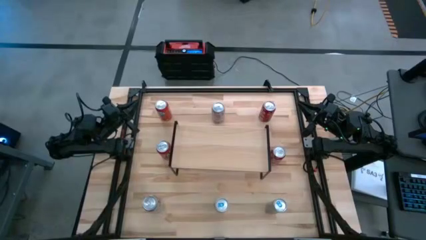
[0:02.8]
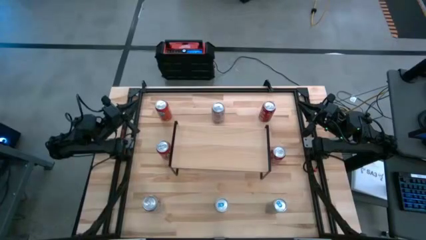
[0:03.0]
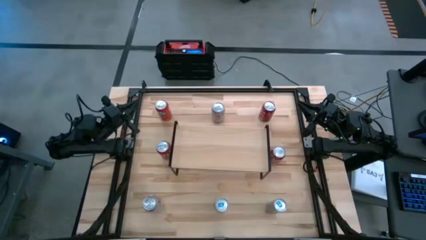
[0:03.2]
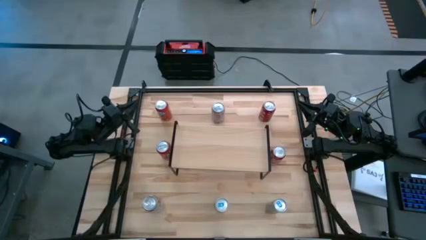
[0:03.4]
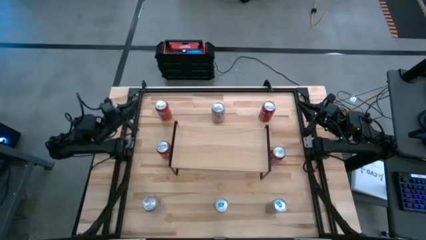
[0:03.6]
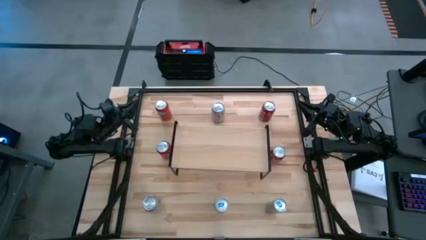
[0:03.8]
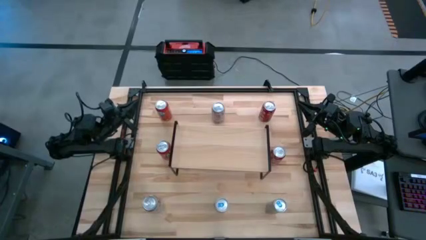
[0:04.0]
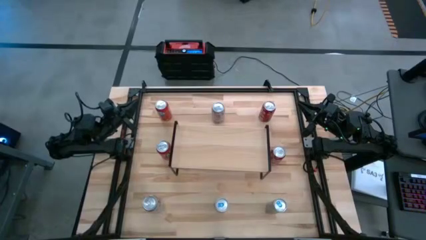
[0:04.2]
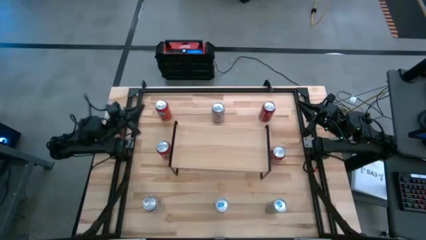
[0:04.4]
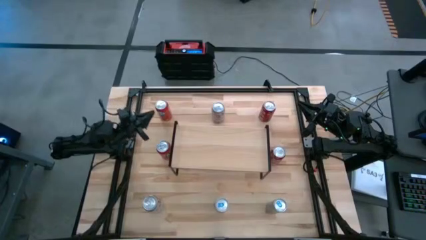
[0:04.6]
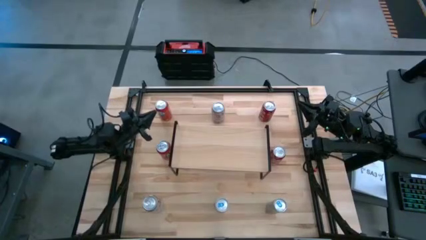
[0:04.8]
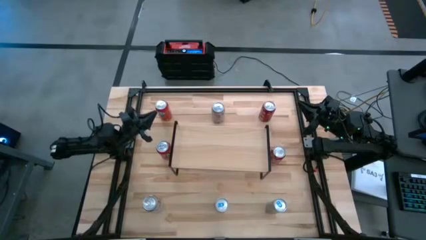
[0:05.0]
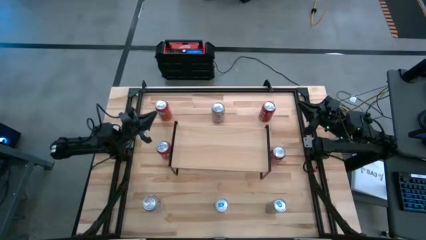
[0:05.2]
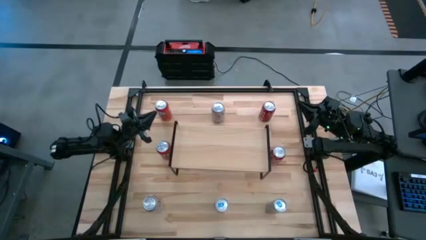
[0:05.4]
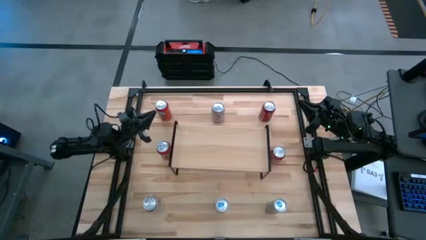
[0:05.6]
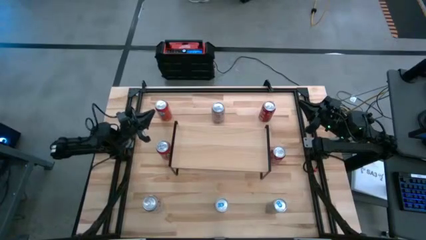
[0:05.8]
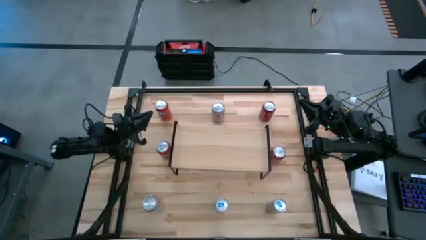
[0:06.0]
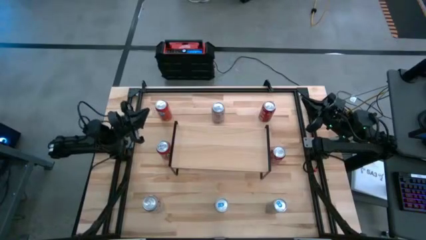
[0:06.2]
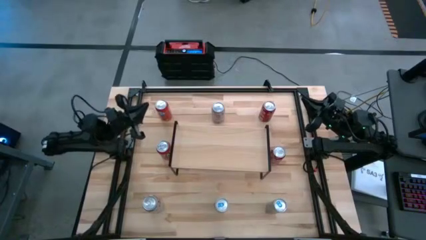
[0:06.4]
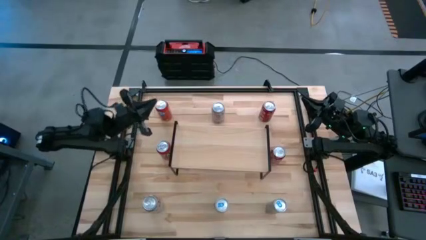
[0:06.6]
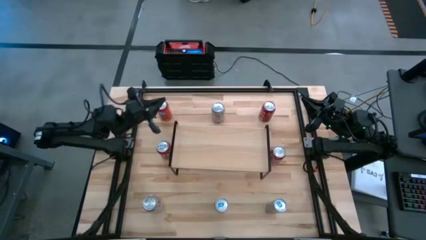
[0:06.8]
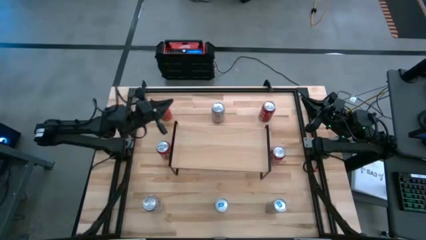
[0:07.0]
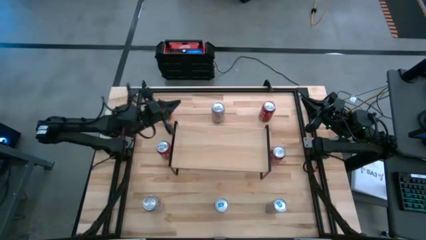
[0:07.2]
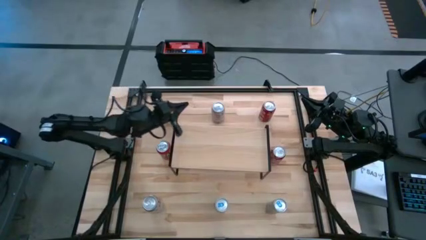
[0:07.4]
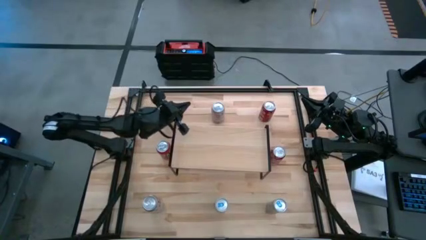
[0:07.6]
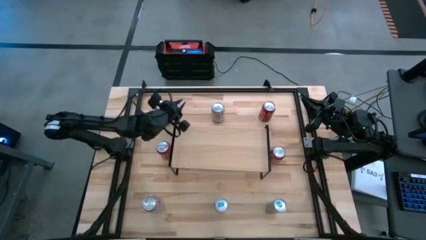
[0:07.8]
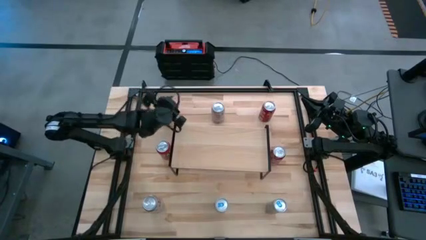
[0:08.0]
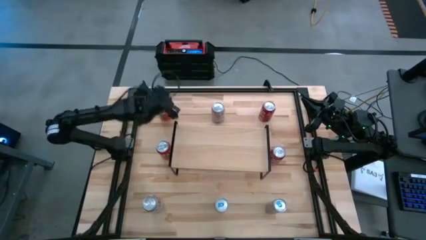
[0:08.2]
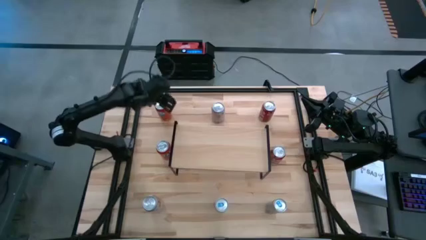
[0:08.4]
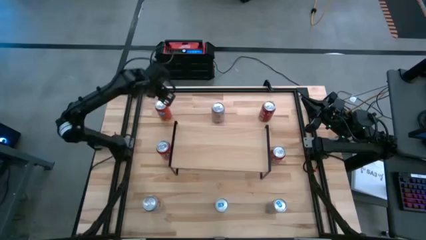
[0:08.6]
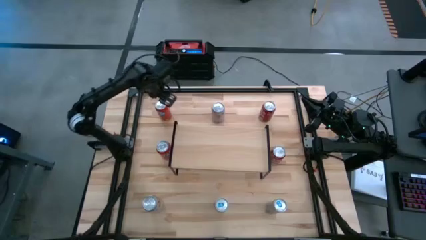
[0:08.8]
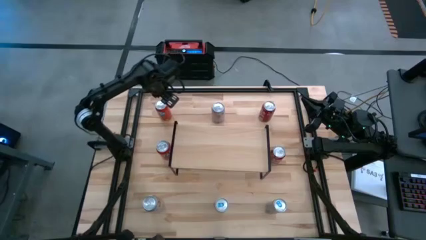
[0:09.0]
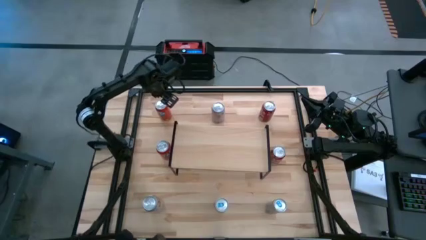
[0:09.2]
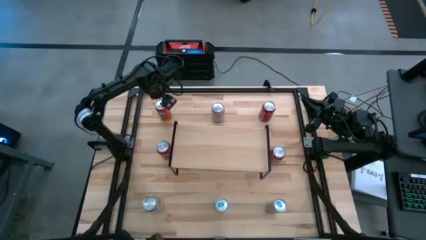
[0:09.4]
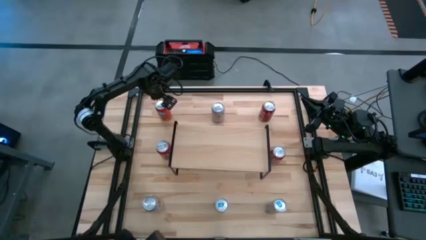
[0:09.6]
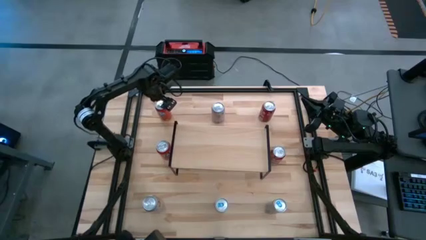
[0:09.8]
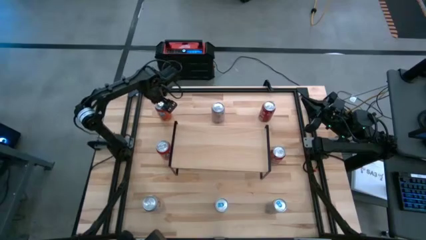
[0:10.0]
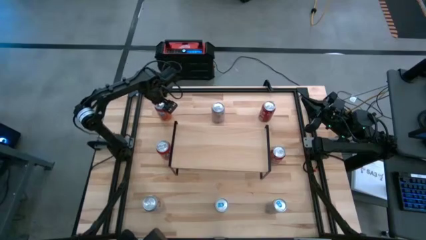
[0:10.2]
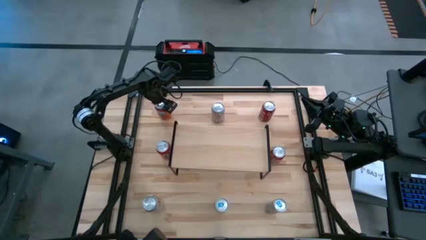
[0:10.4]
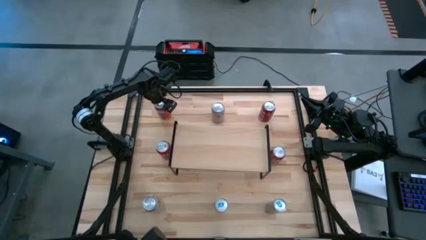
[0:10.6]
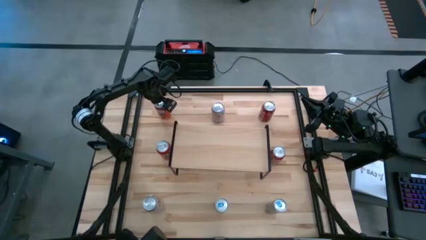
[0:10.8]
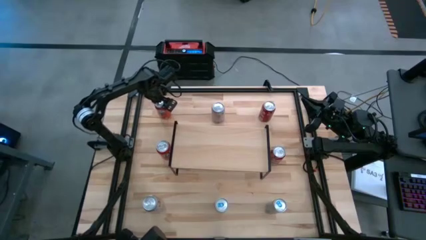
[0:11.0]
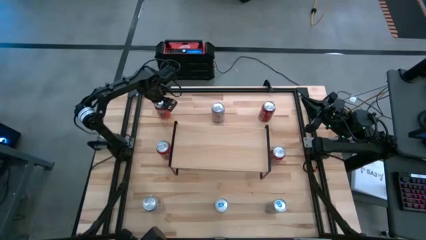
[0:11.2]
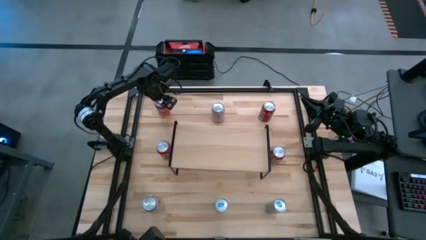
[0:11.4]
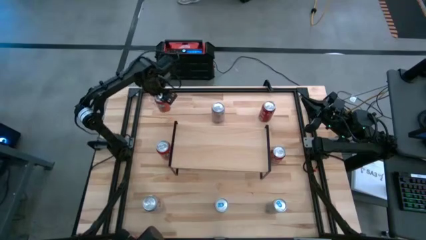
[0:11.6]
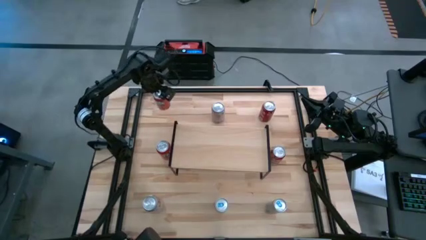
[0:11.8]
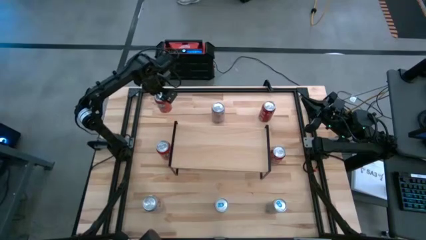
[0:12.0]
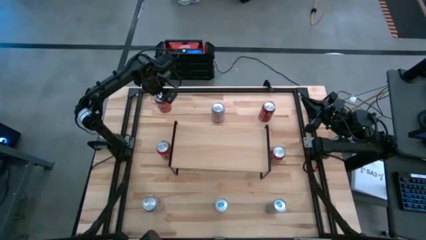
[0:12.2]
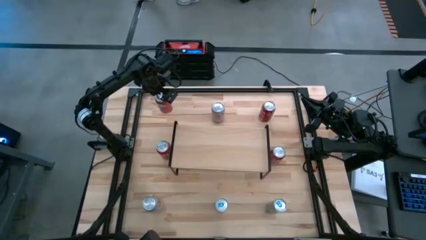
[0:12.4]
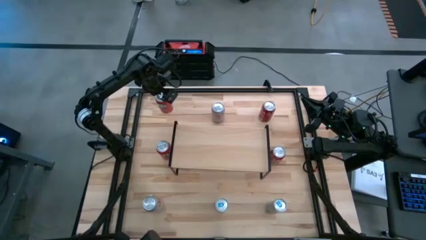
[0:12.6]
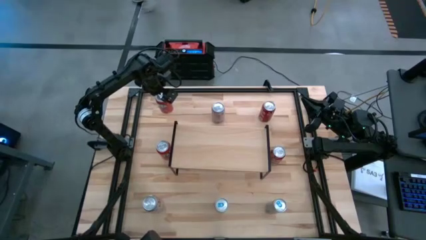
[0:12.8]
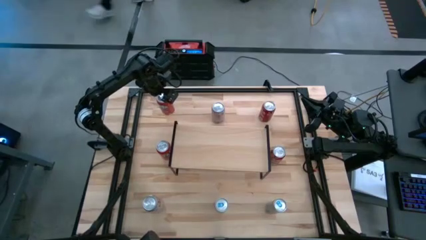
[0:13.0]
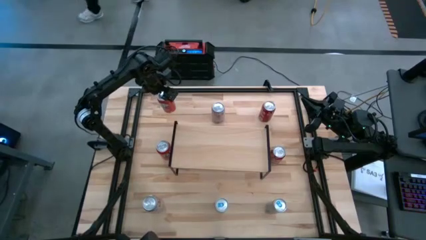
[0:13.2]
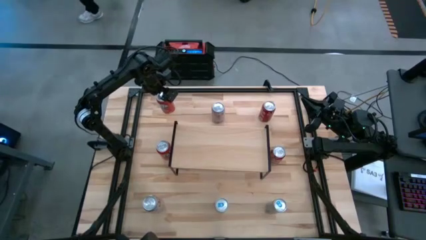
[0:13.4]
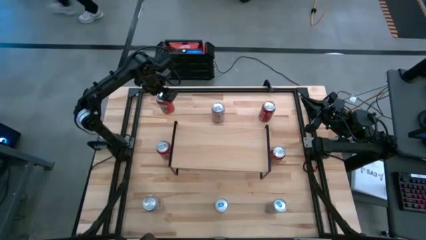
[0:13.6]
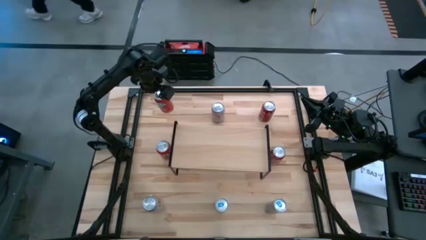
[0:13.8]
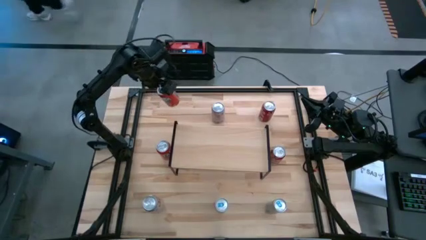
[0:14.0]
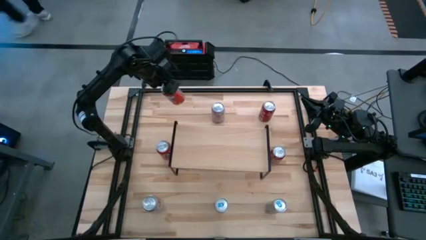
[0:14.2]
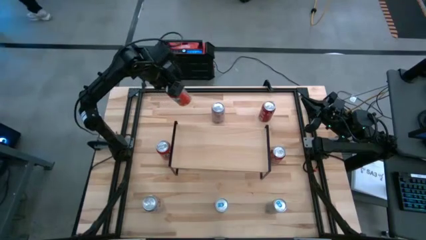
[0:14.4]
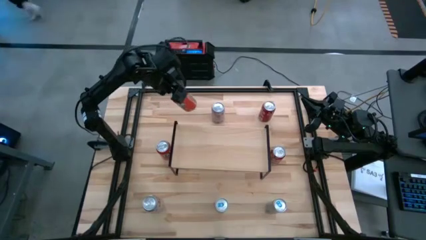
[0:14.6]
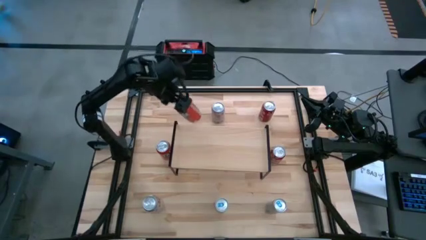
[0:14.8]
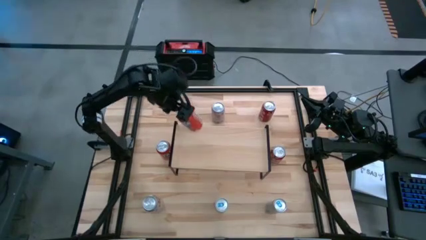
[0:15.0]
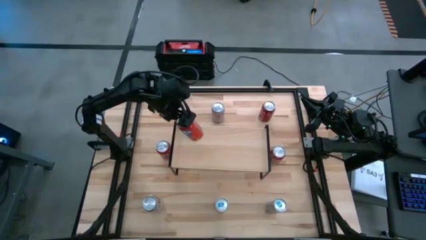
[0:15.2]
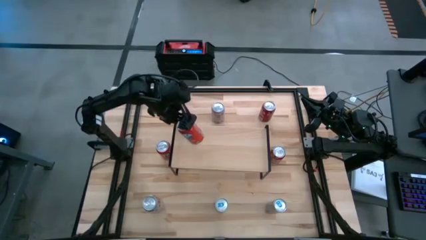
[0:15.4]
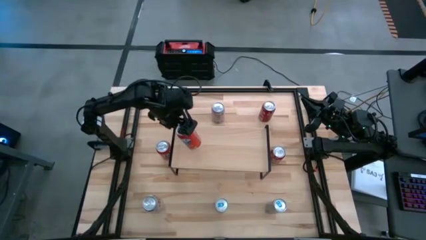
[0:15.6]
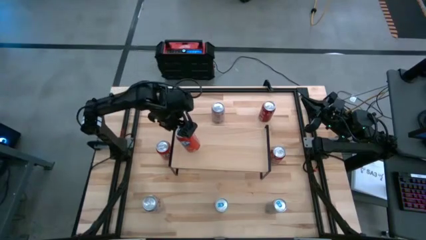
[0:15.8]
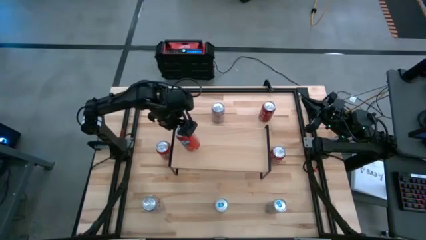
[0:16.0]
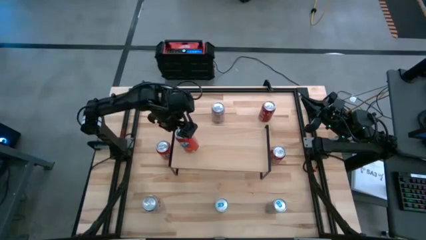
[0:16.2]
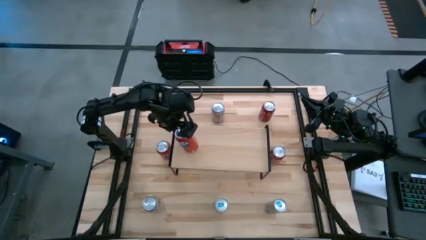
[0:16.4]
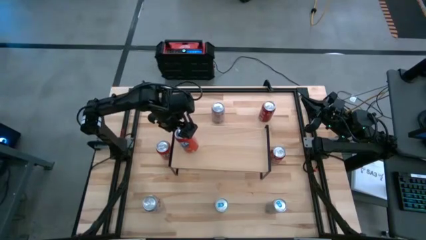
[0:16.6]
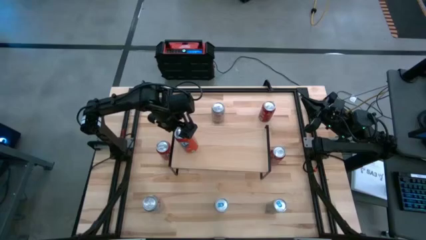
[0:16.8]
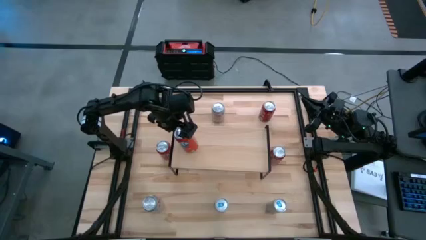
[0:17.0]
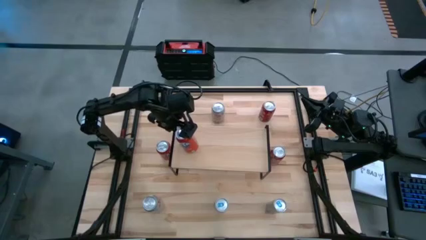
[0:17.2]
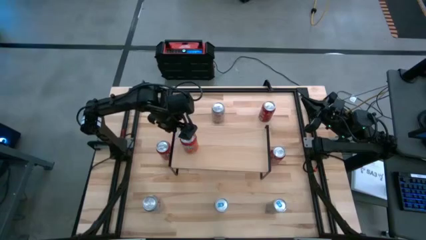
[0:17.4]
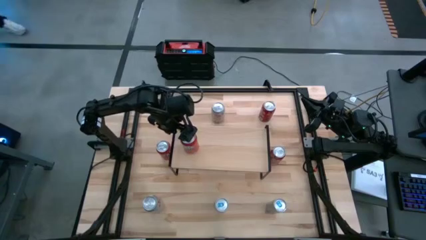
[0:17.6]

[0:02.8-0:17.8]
Task: Place canned beverage on shelf
Put the top orange soda can on the shelf
